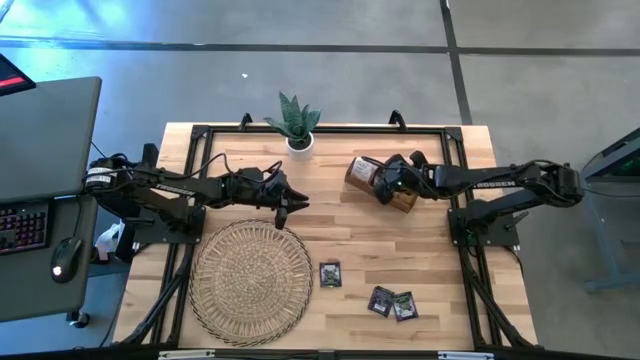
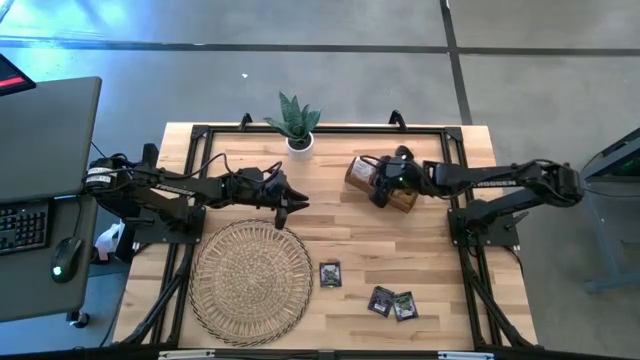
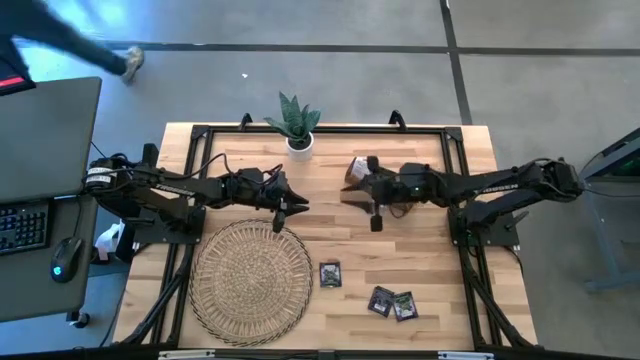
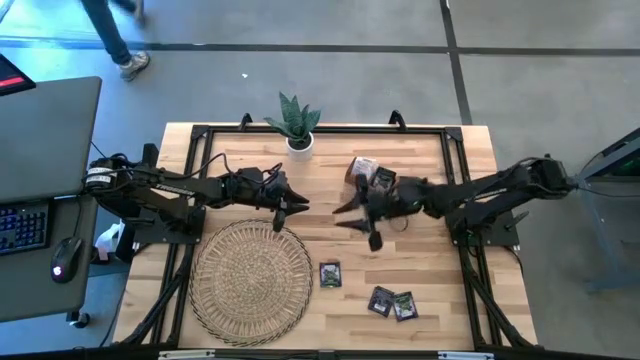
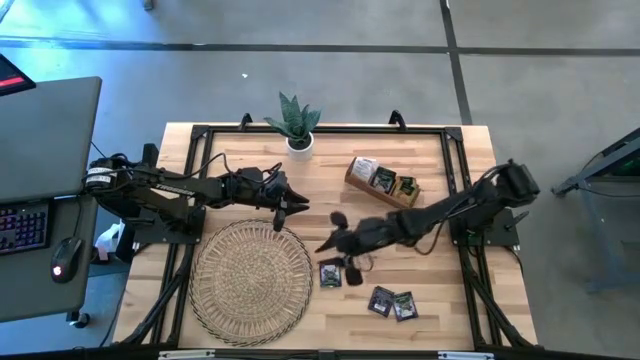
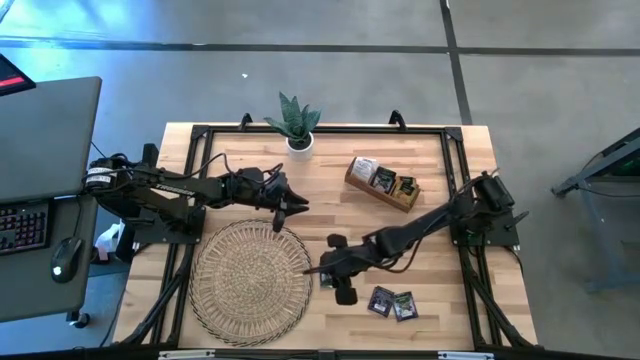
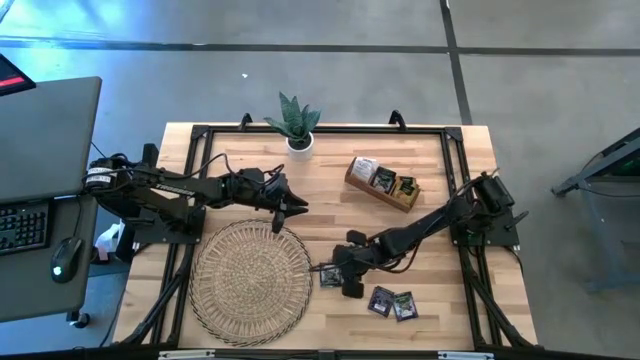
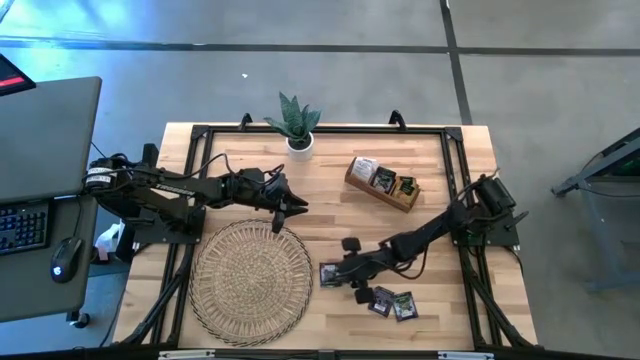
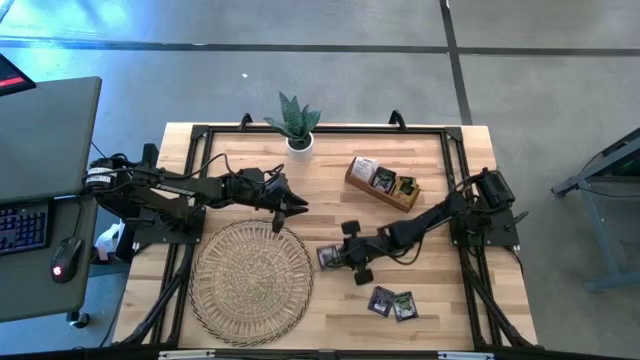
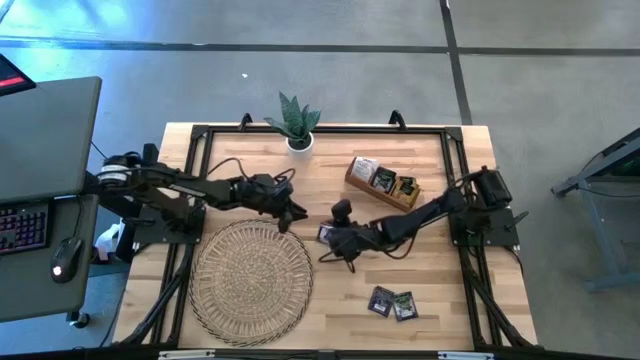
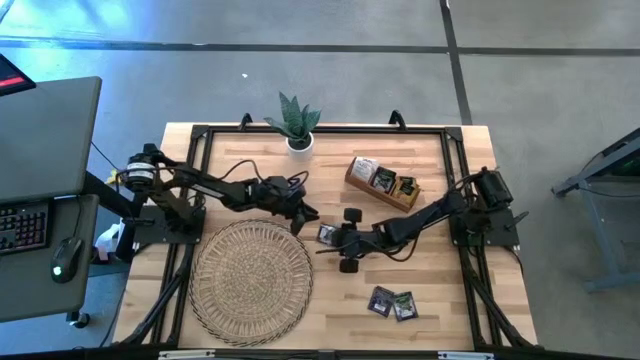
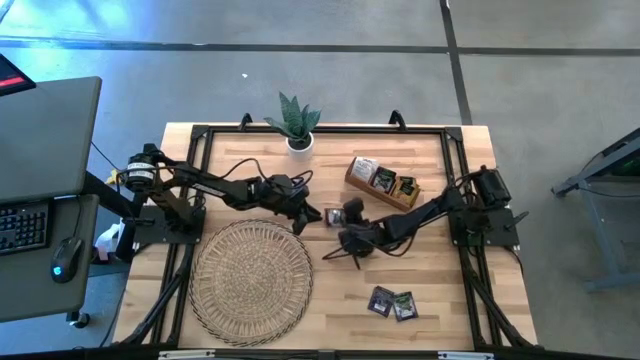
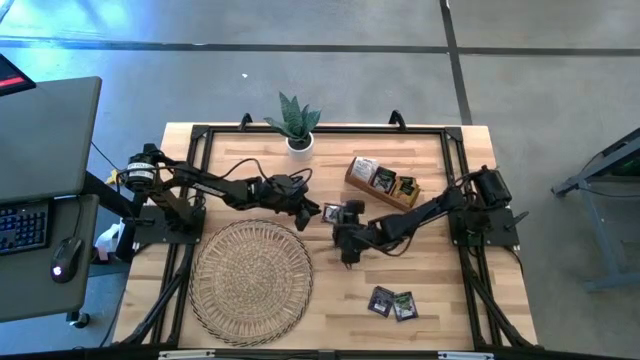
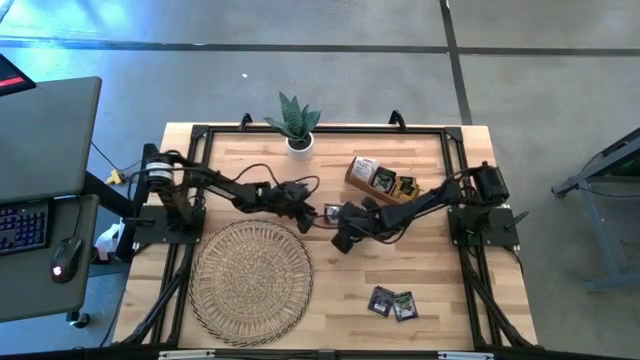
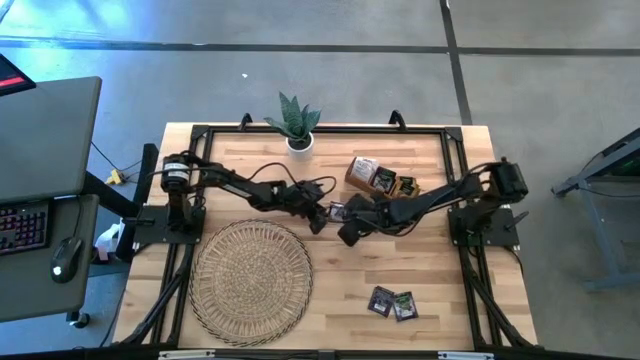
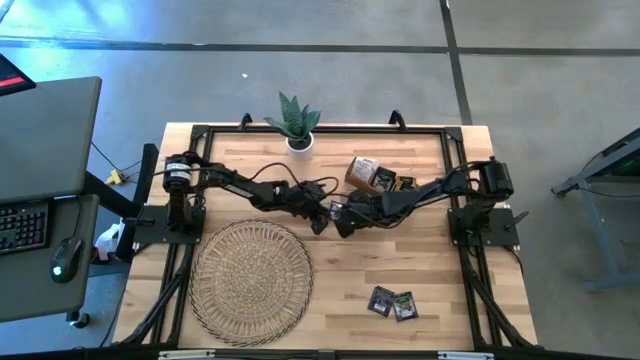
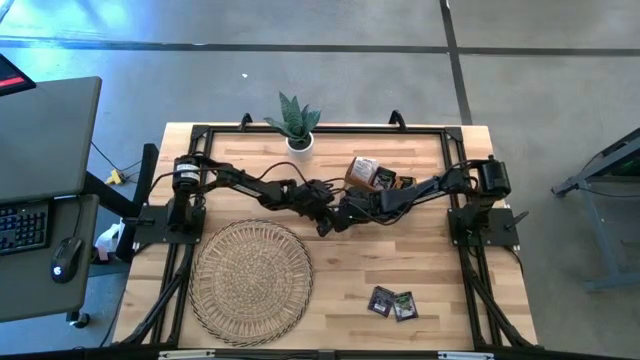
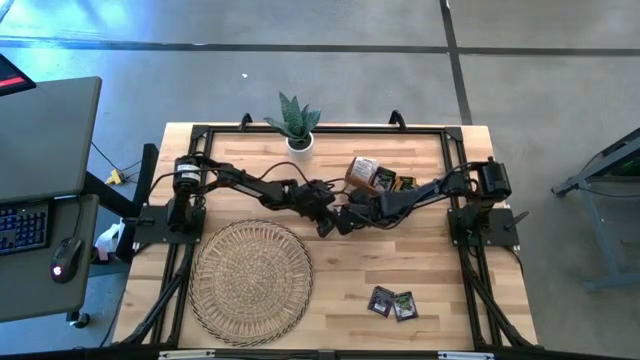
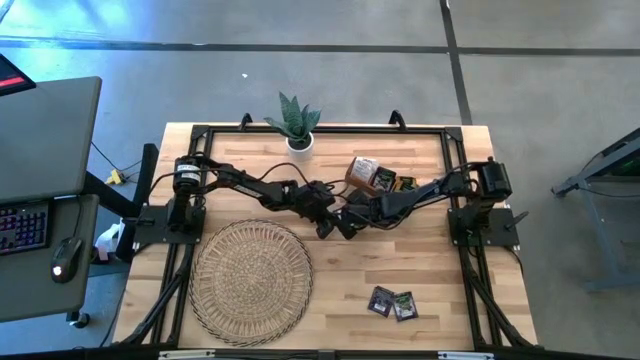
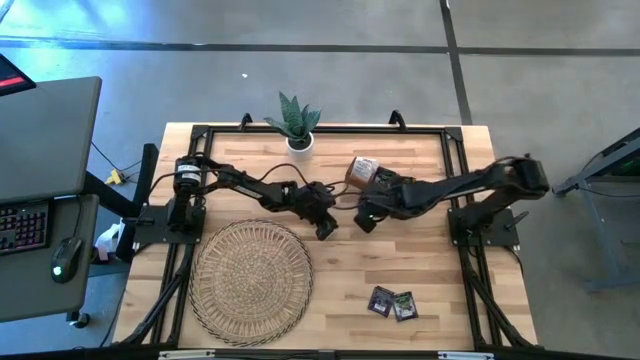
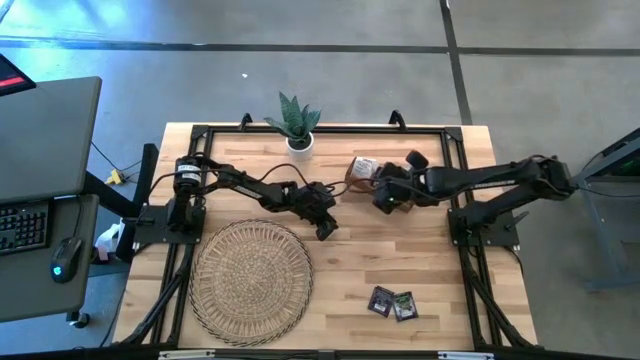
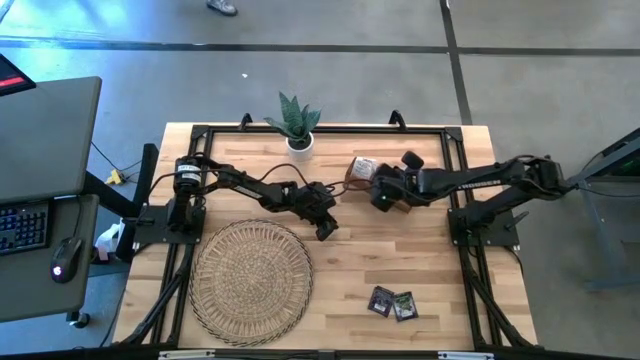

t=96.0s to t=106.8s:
Task: Pick & Place Tea
Put the black tea bag into the middle section of the wooden organizer

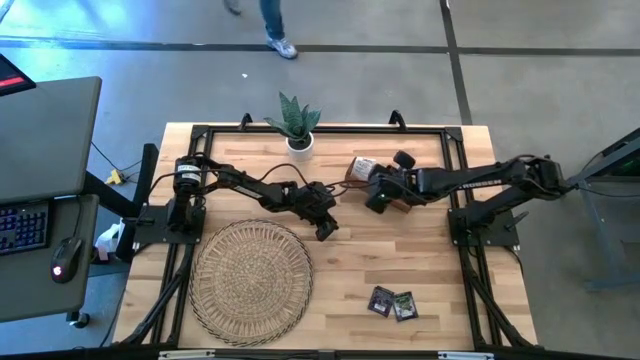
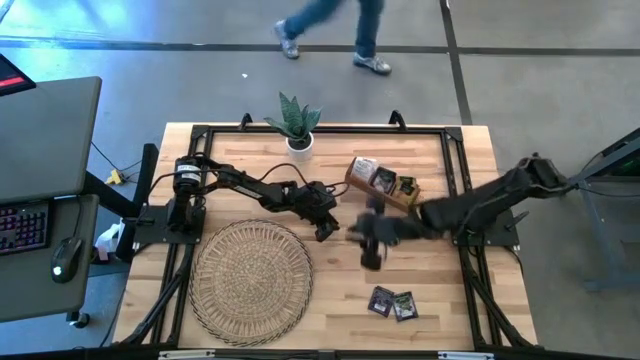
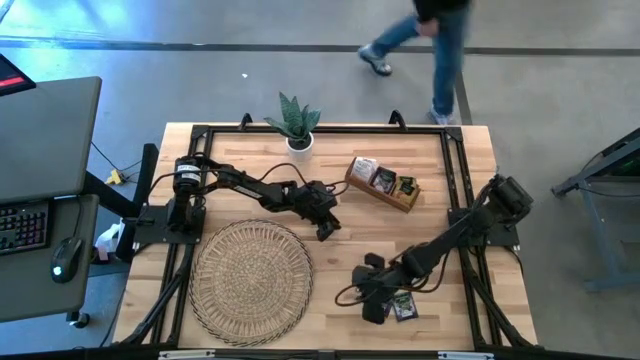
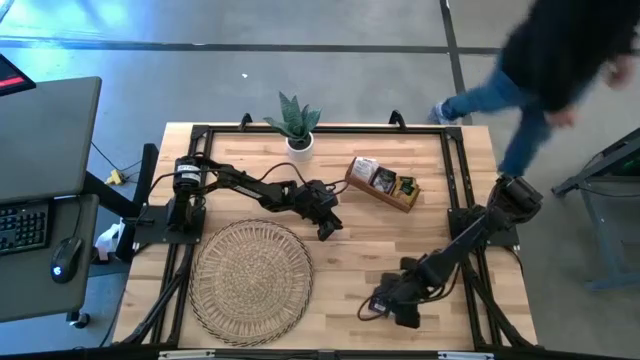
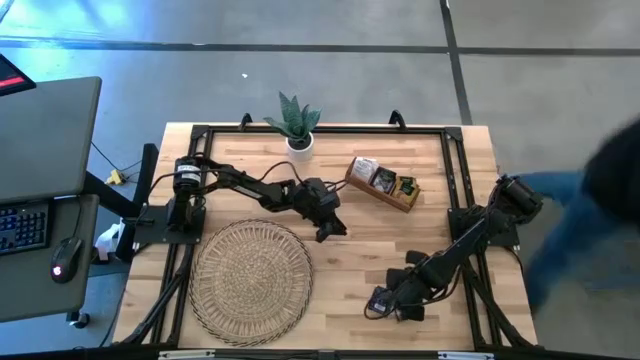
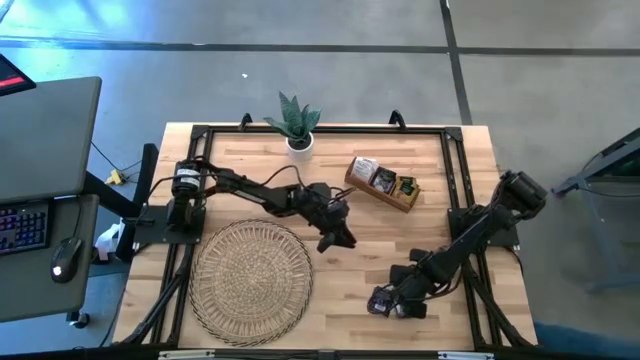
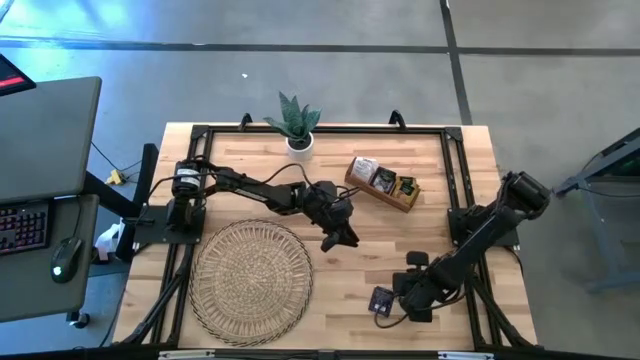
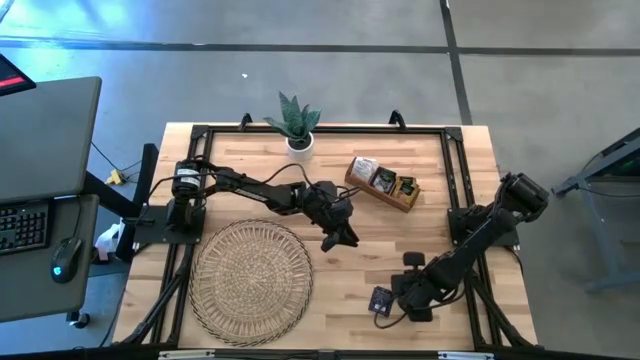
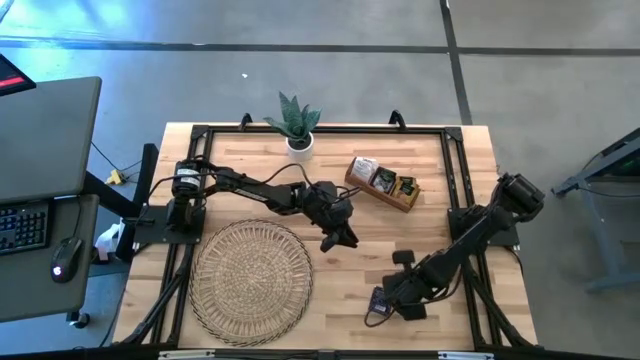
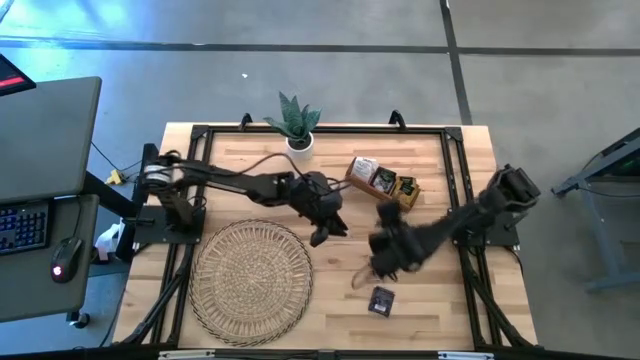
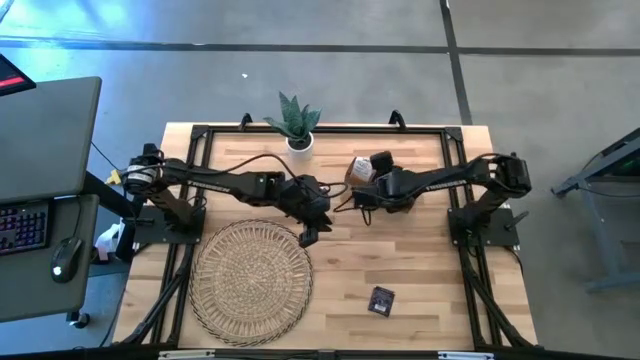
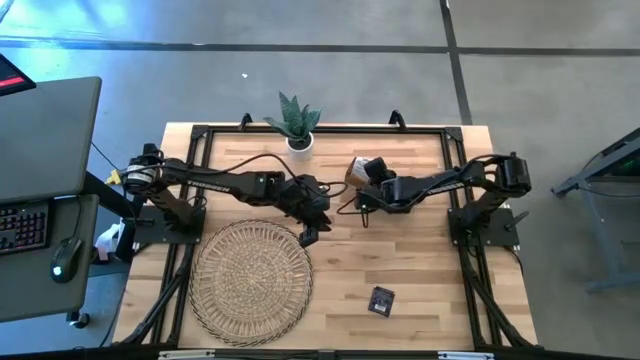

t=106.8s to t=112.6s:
Put the black tea bag into the middle section of the wooden organizer

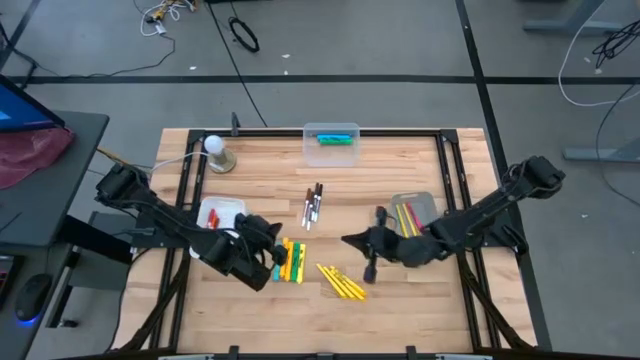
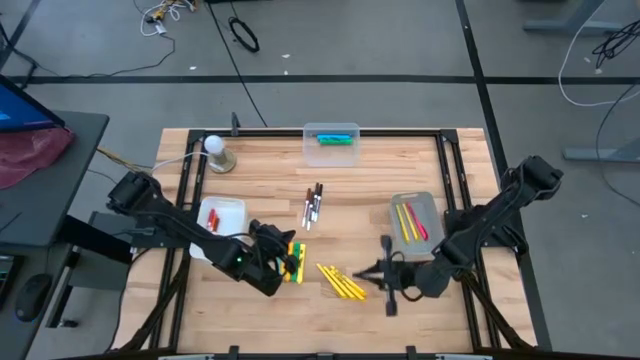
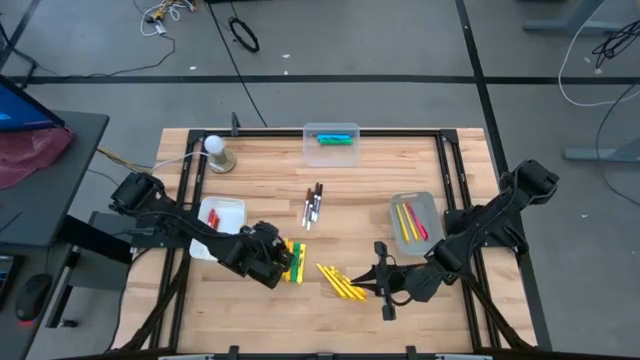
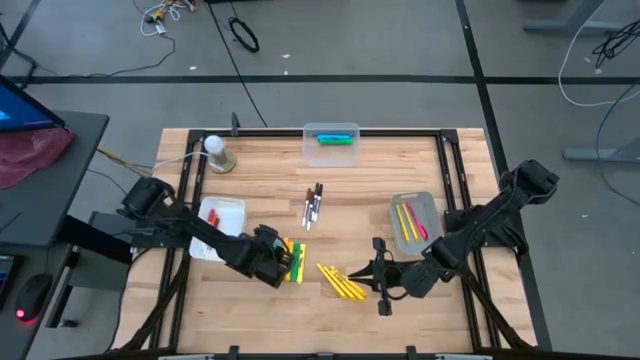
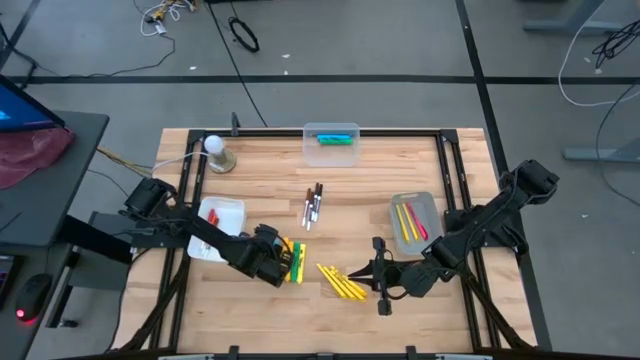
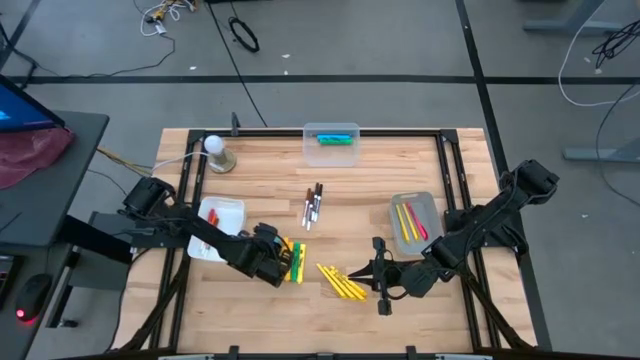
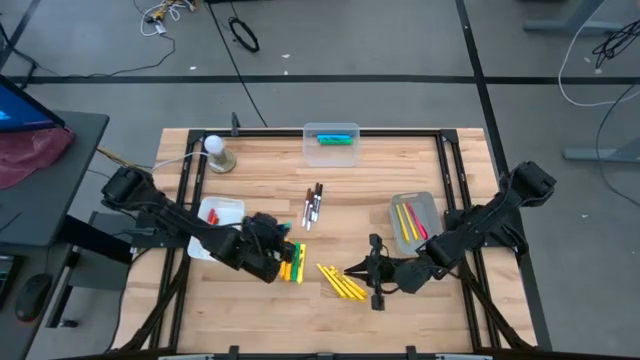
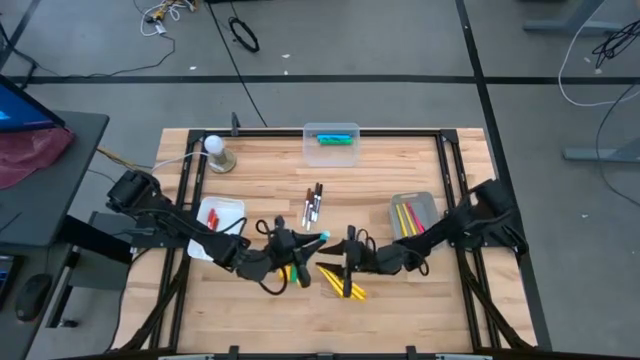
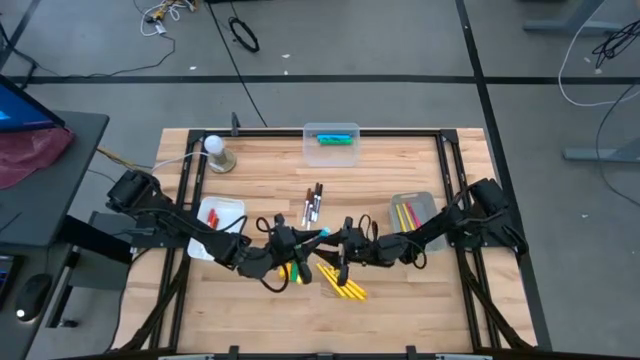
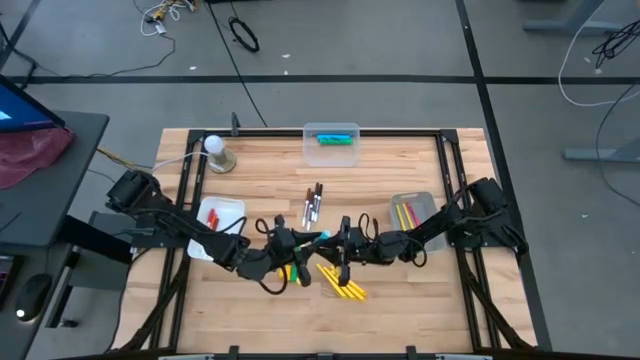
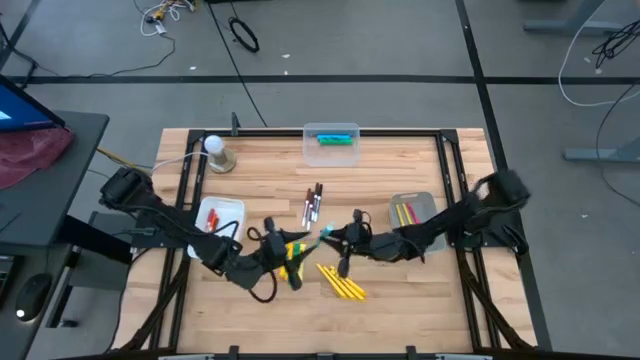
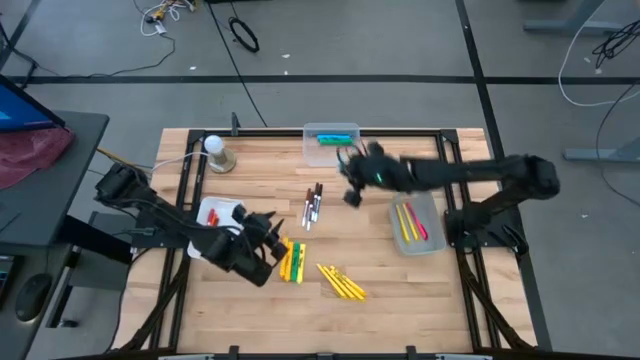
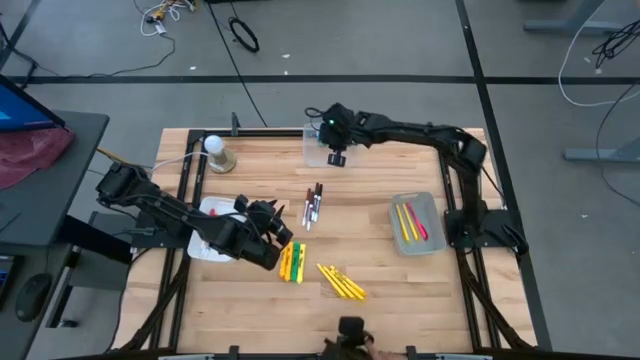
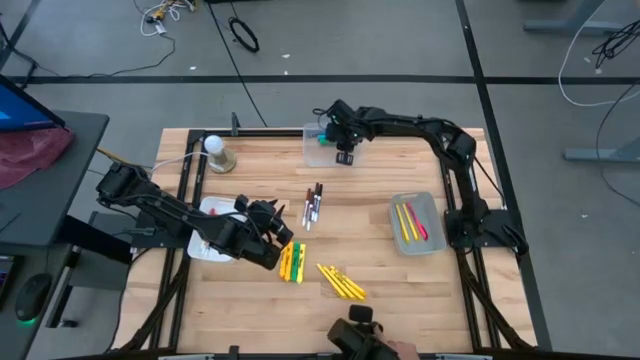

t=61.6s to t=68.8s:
Task: Pick & Place Markers
Put the light blue highlighter pen into the transparent bin
